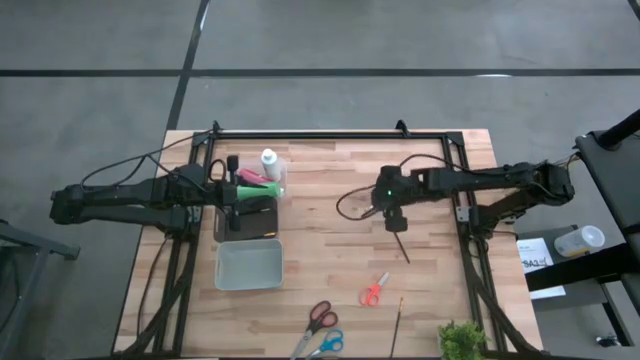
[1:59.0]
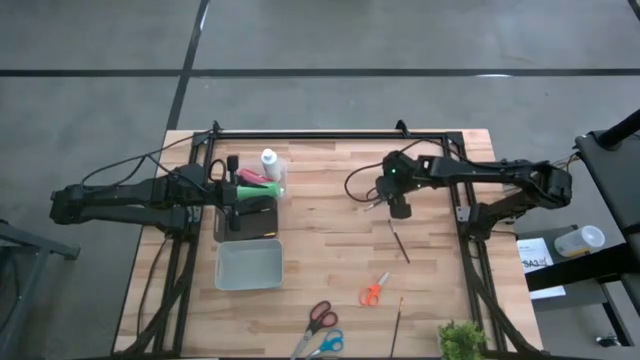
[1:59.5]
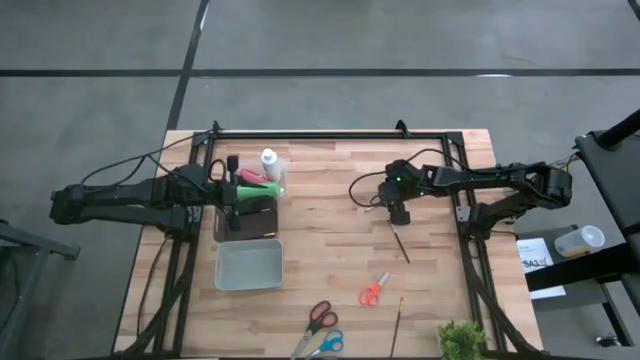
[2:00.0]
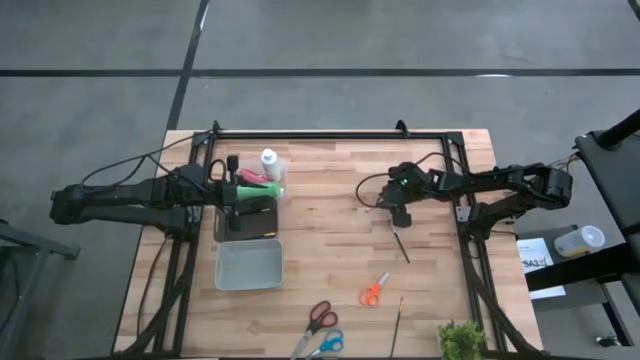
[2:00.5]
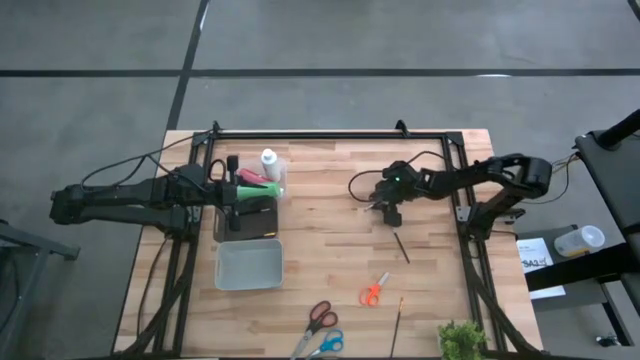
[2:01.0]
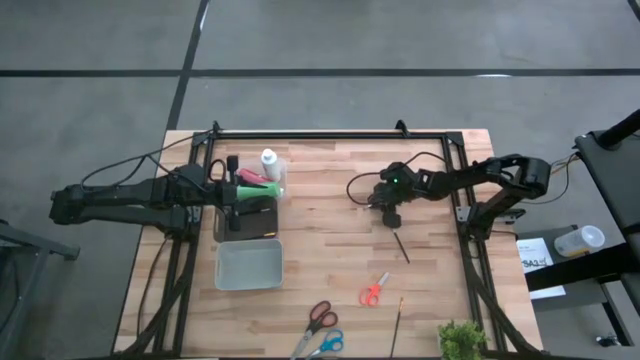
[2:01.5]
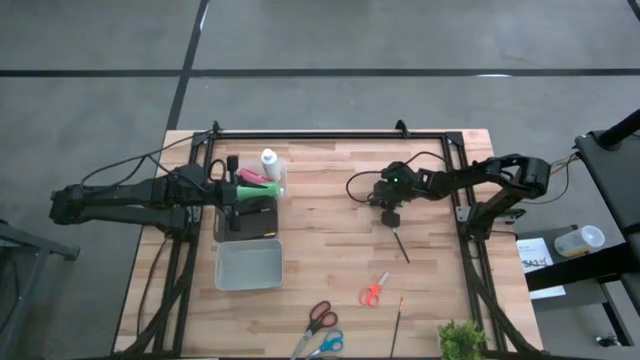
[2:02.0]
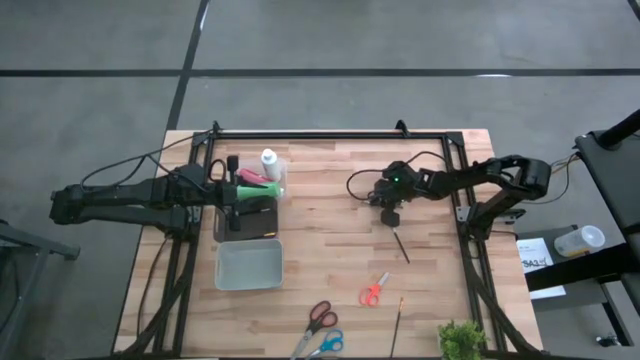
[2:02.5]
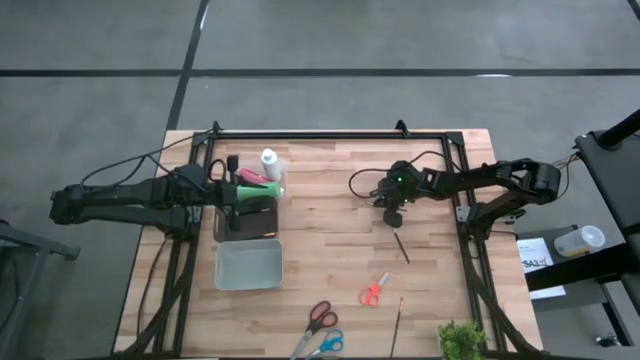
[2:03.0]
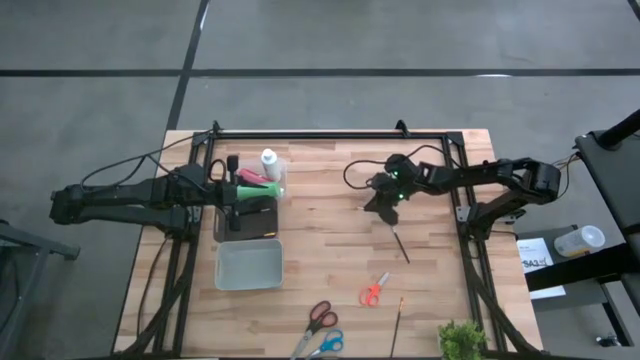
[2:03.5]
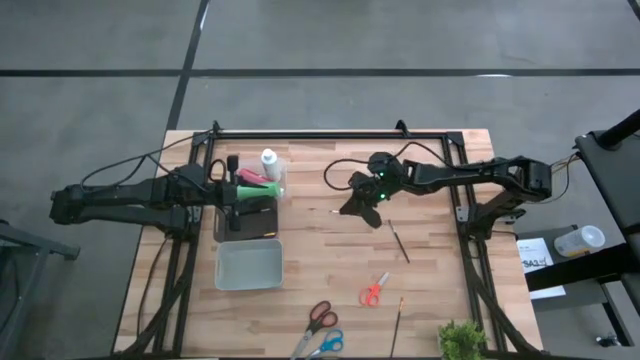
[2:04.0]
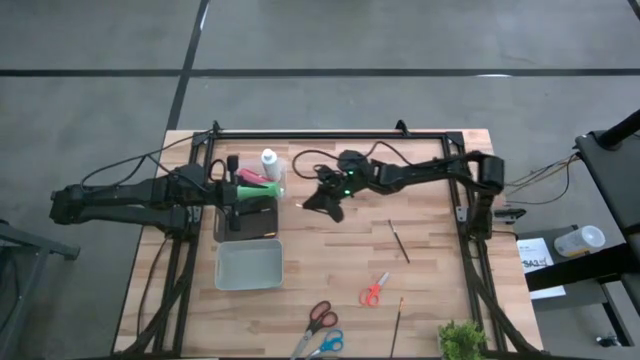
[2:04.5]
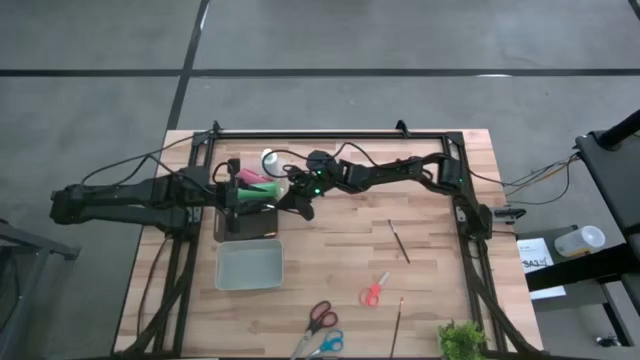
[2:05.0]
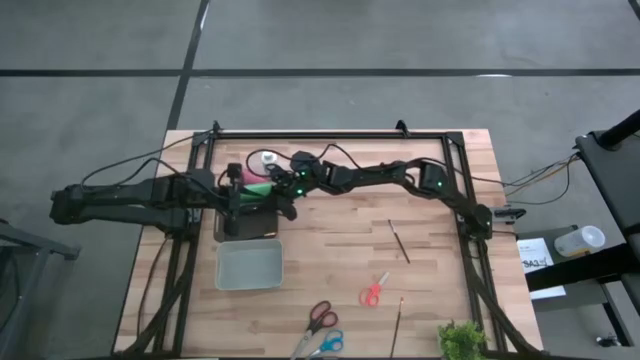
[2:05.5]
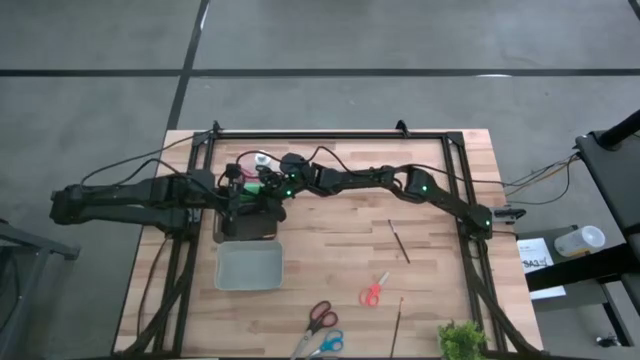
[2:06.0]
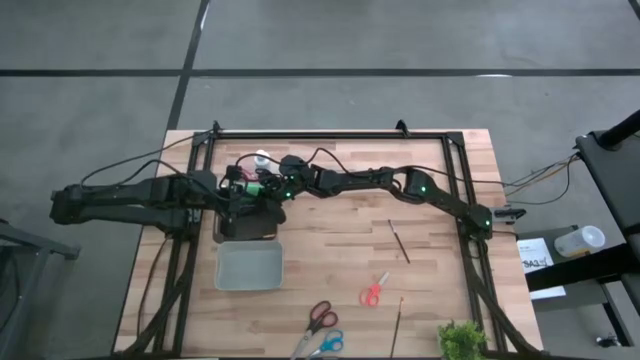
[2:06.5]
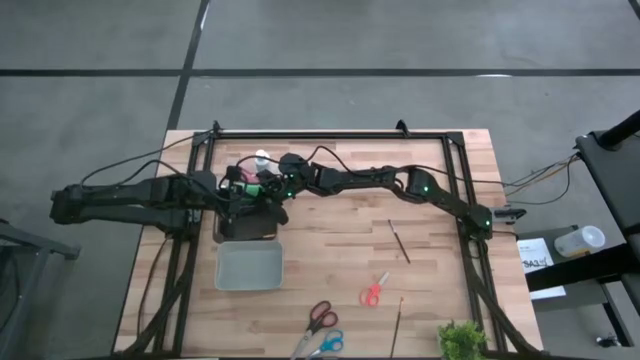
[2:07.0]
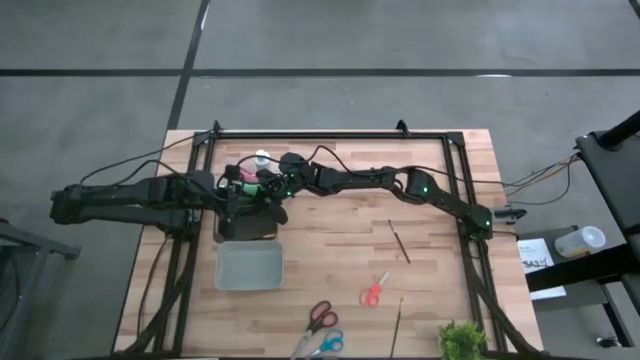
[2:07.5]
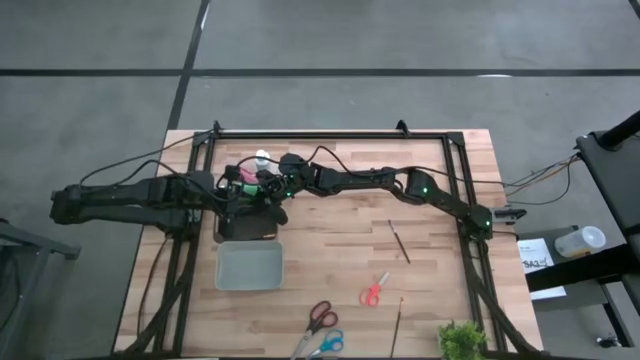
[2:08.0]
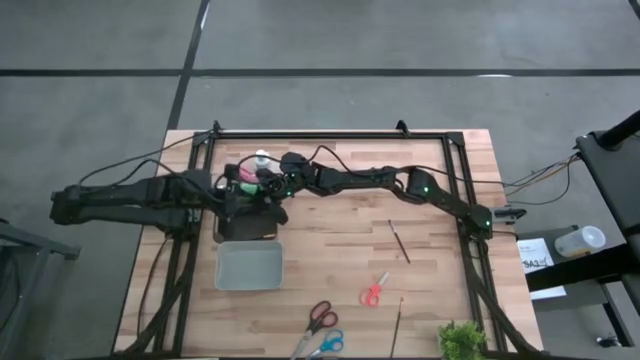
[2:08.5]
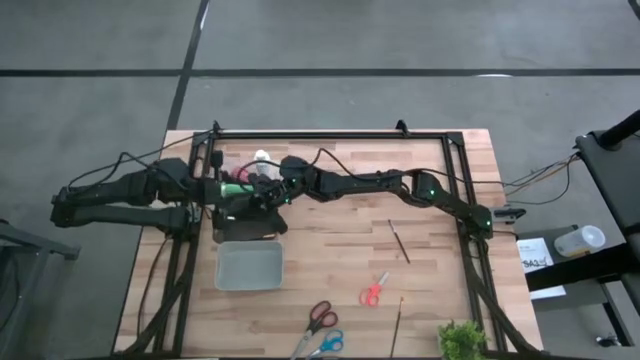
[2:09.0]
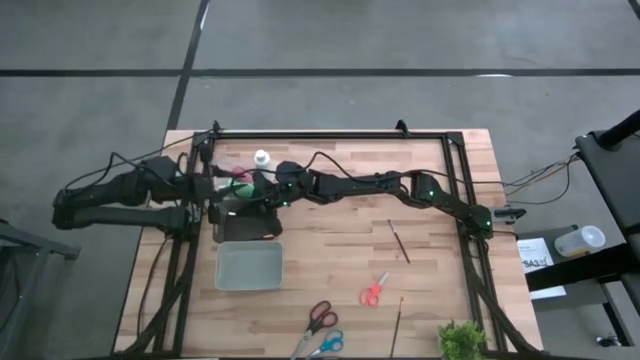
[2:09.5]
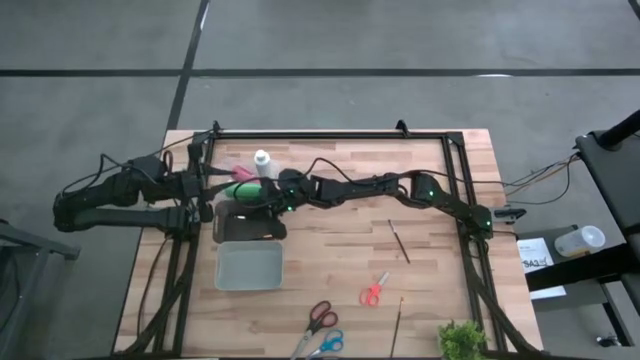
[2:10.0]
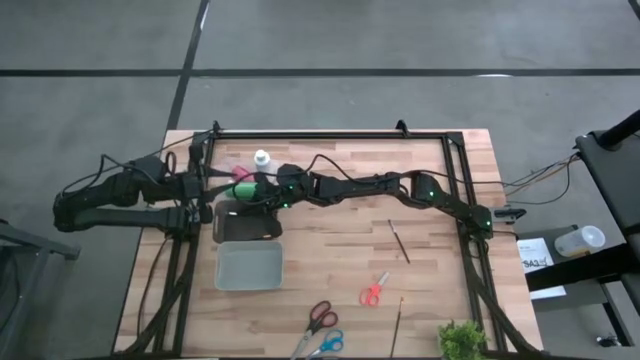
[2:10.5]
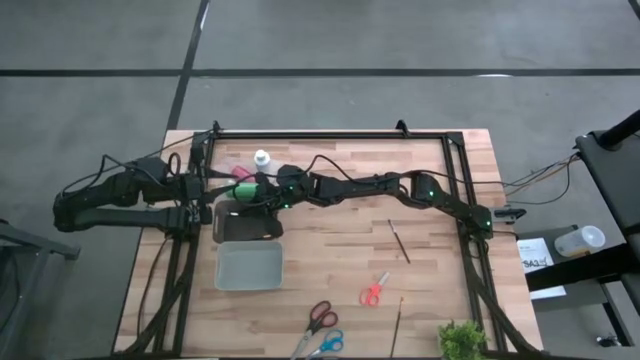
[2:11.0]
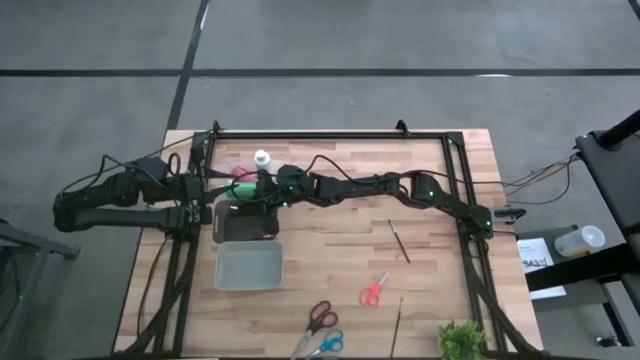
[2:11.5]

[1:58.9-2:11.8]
Task: Pick & Place Paint Supplies
Put the left silver makeup brush into the black bin

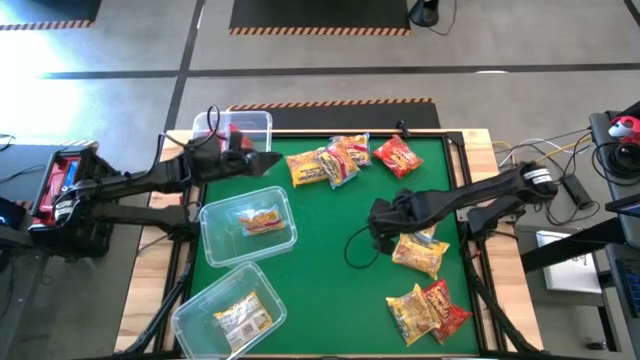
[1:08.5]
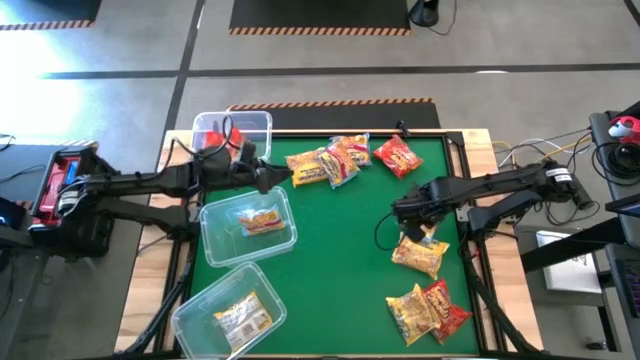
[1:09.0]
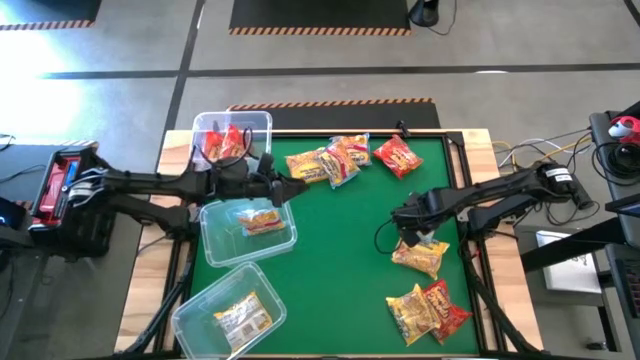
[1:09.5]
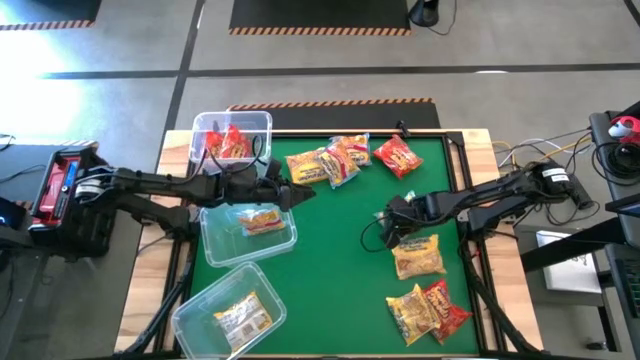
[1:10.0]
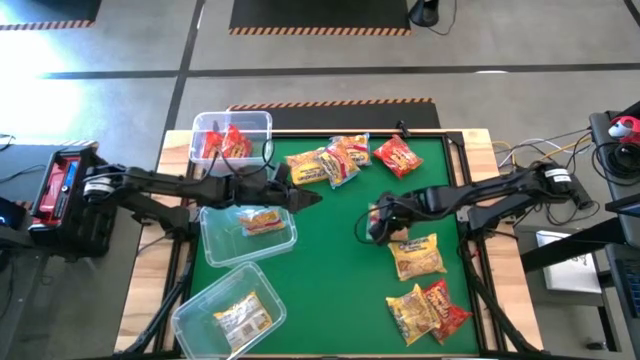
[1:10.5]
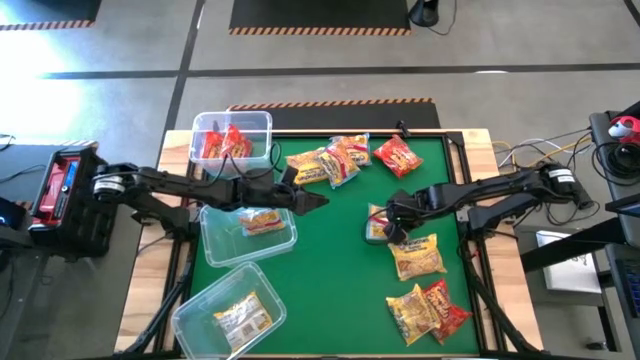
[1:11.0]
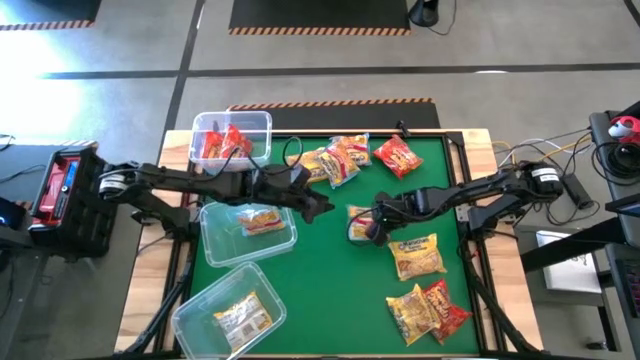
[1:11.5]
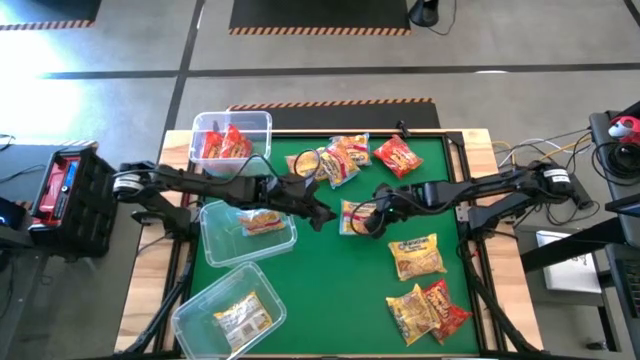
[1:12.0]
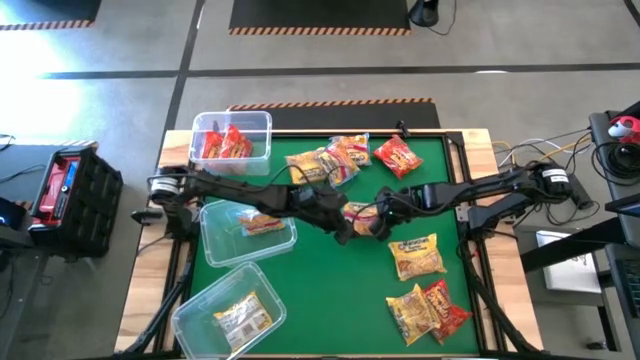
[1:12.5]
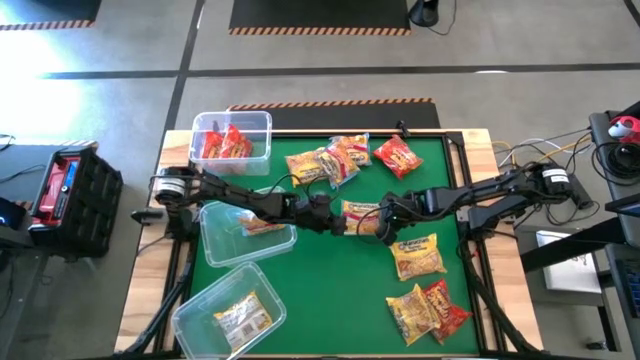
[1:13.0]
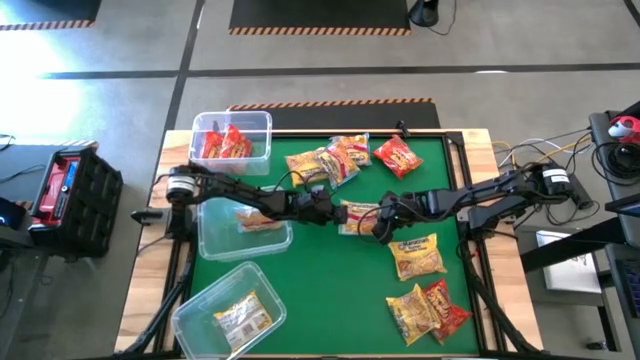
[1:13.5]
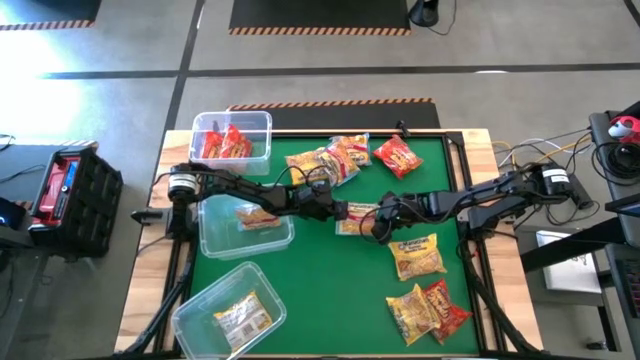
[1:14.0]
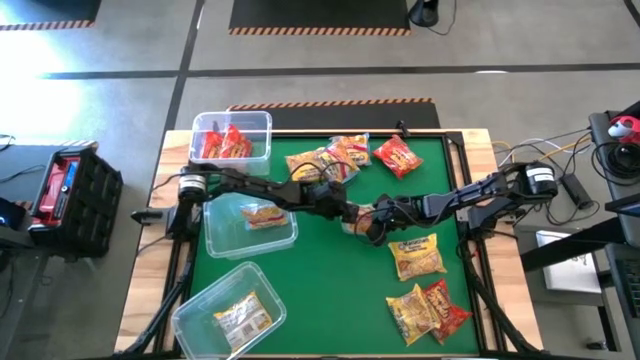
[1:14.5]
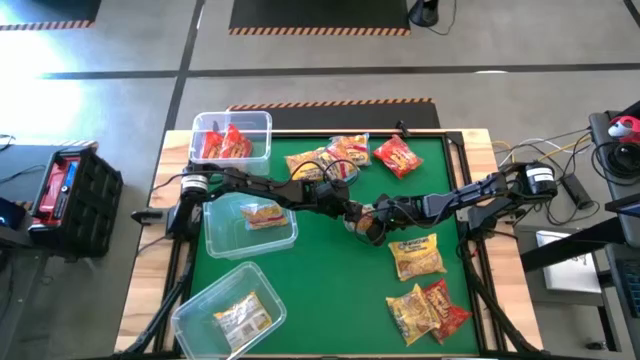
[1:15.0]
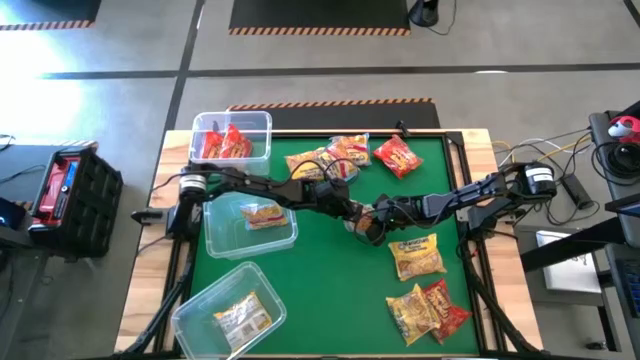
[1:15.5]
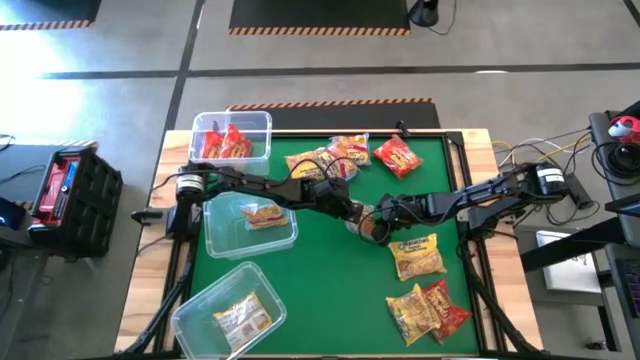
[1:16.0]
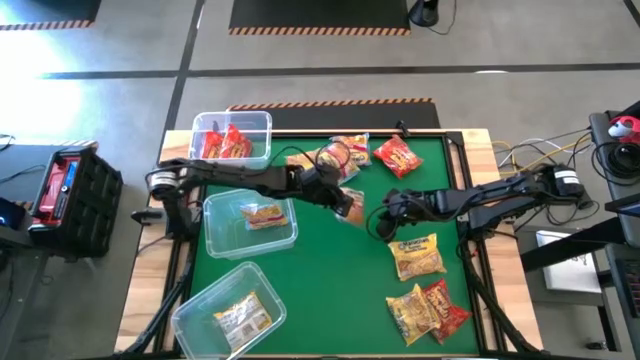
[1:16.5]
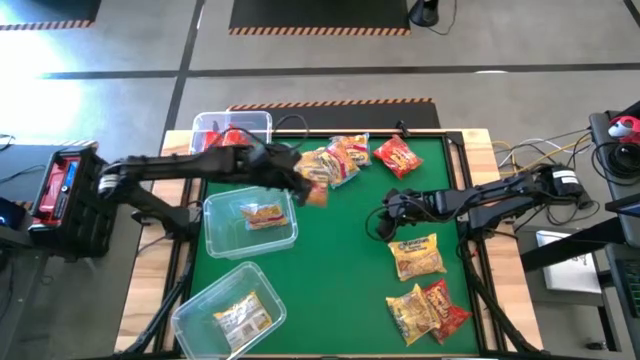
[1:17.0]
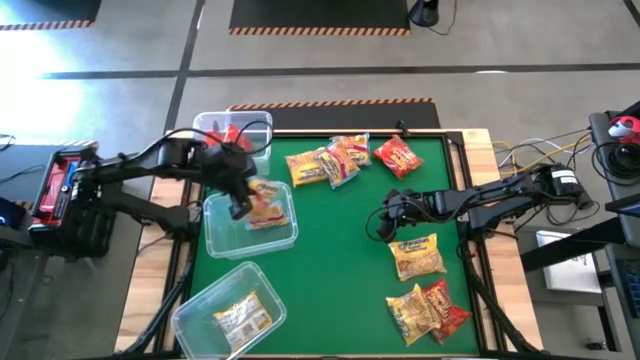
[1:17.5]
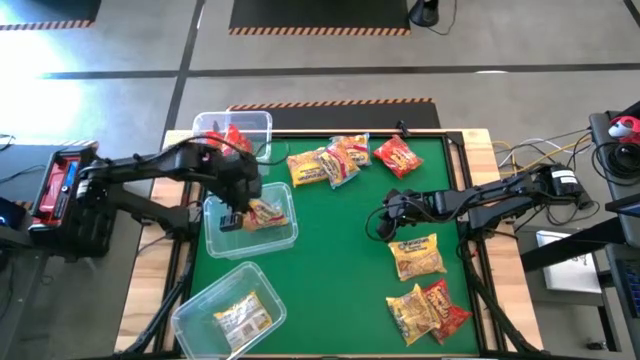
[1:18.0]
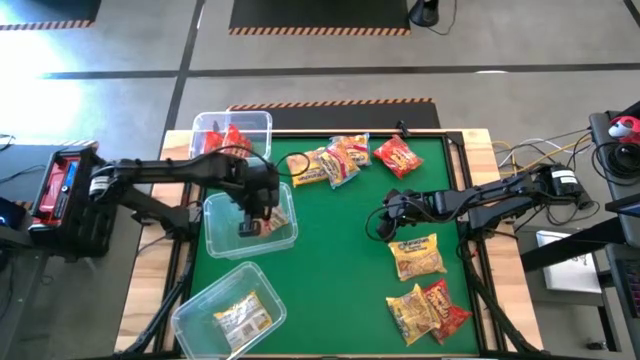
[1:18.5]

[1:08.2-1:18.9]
Task: Sort Maruchan noodles
Put the bottom right blue noodle pack into the middle transparent bin
